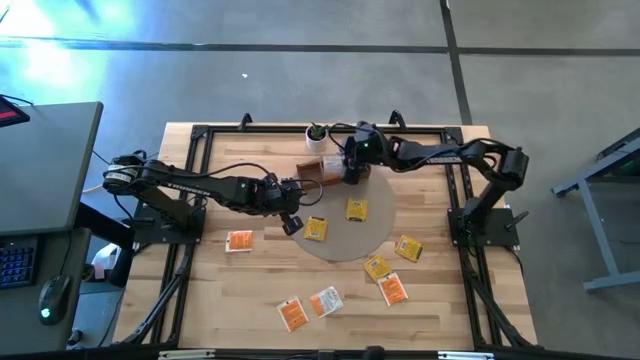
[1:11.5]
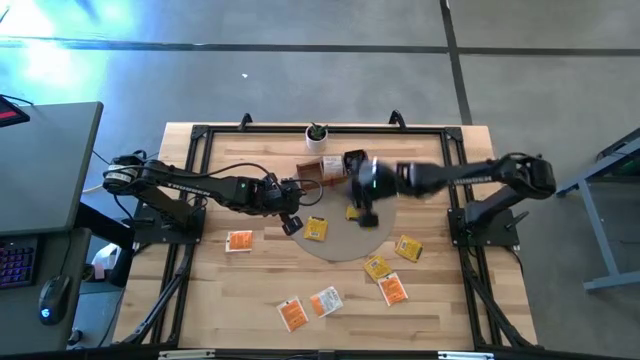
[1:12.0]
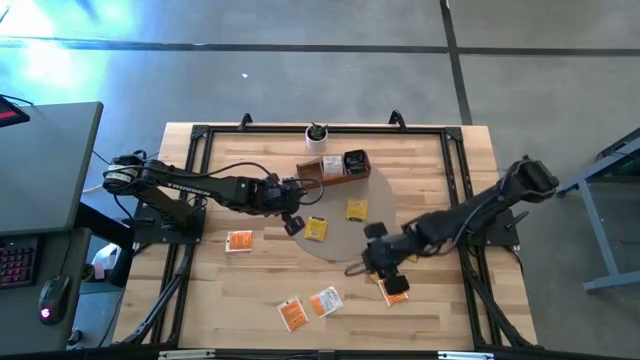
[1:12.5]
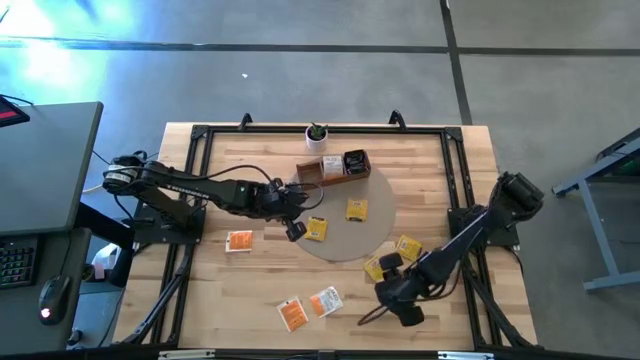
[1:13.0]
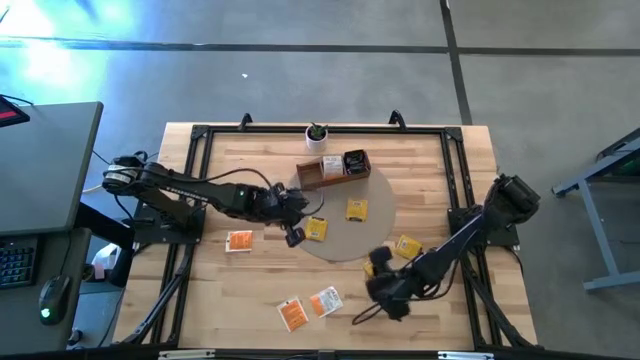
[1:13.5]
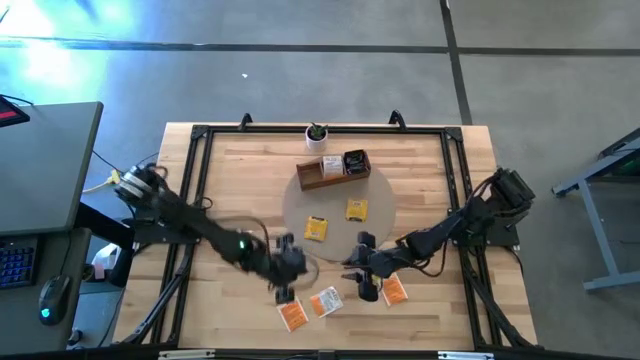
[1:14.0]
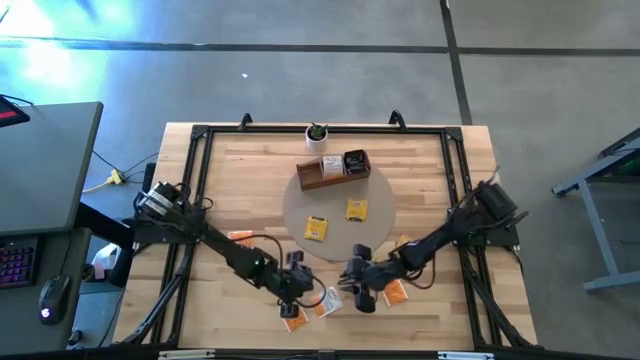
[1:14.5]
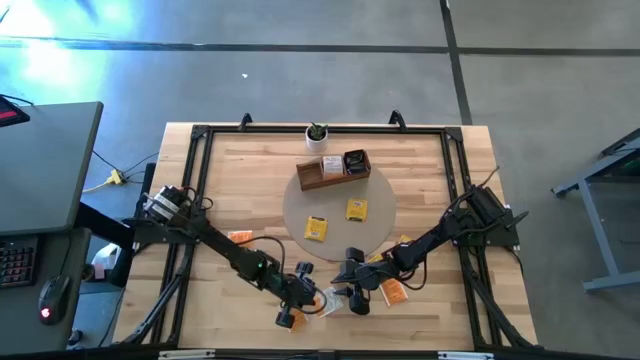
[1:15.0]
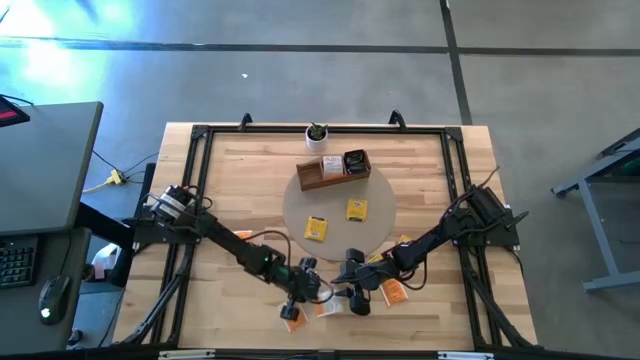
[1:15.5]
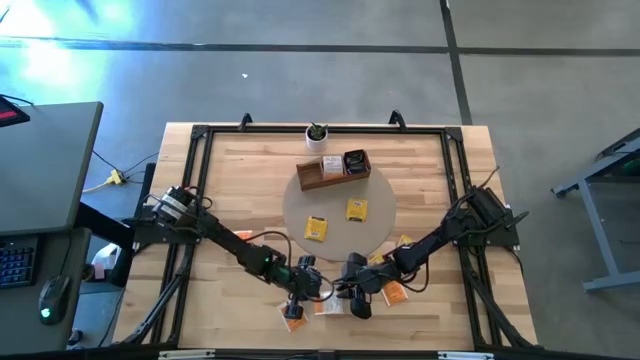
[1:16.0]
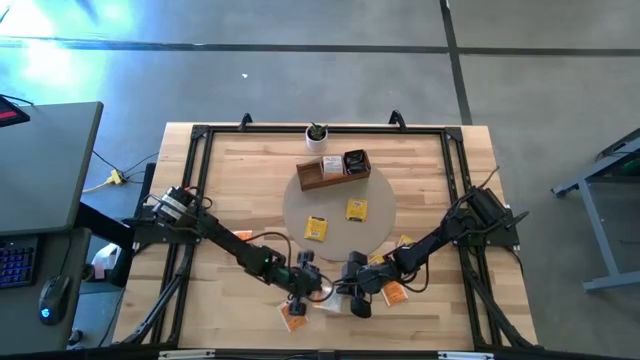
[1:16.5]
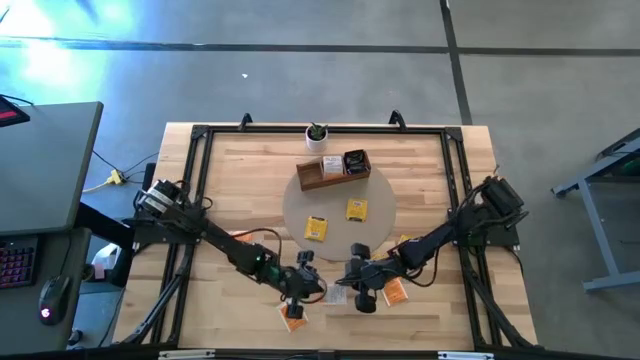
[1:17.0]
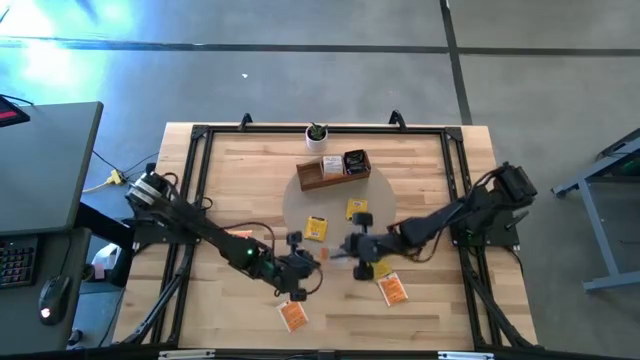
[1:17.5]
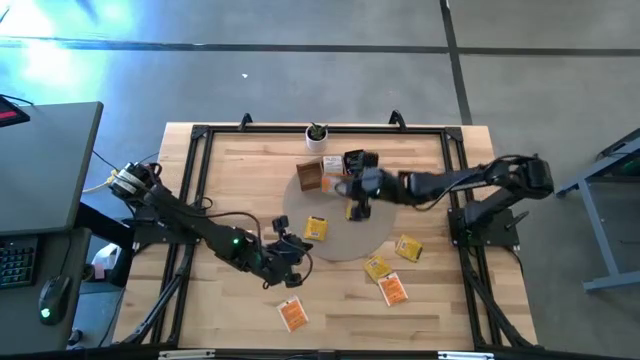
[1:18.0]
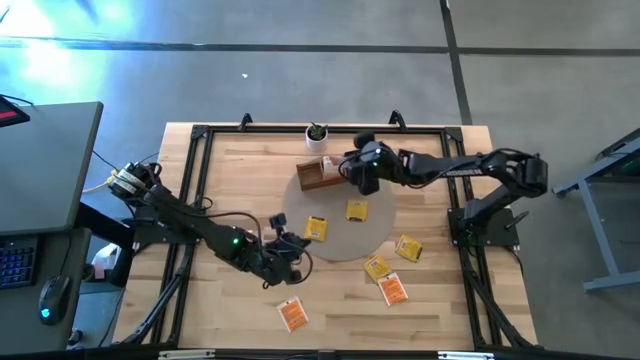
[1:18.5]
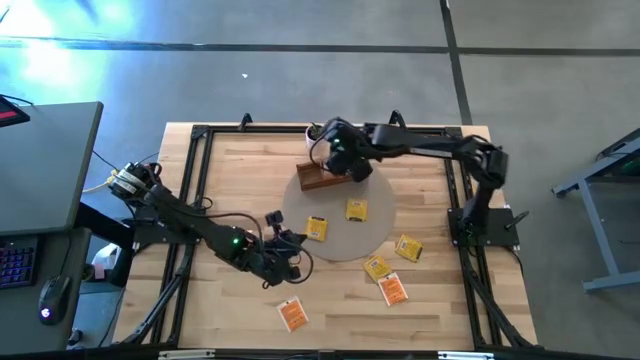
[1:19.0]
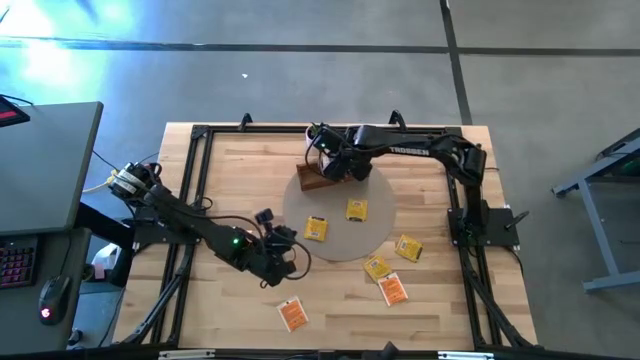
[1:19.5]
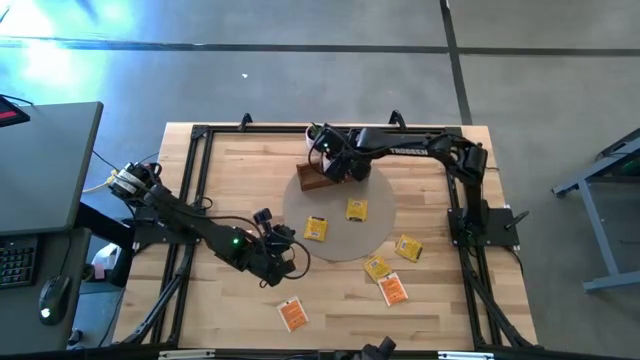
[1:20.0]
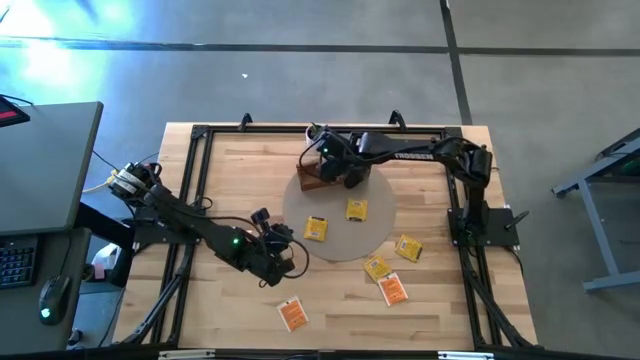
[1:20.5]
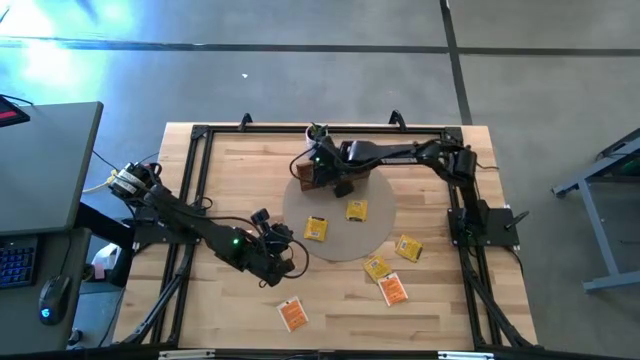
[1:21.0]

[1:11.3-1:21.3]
Task: Pick & Place Tea
Put the orange tea bag into the middle section of the wooden organizer

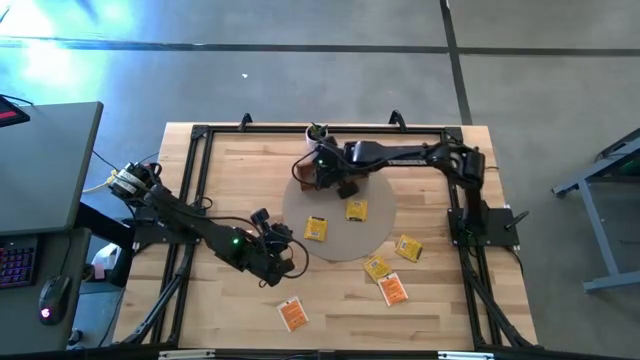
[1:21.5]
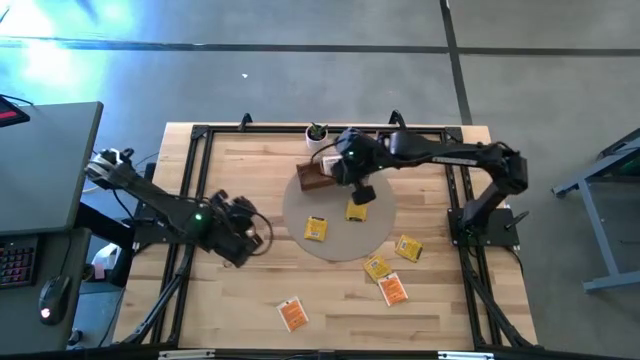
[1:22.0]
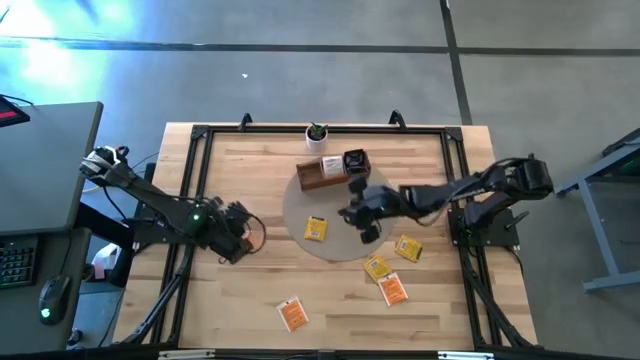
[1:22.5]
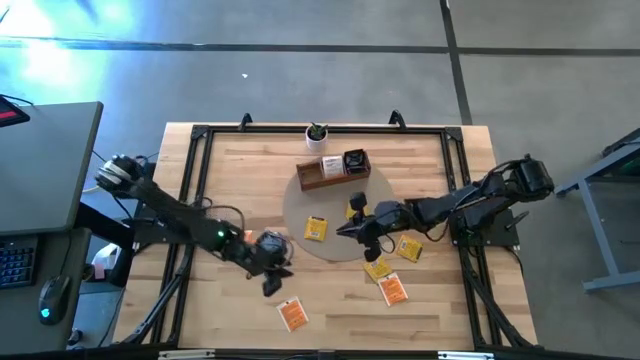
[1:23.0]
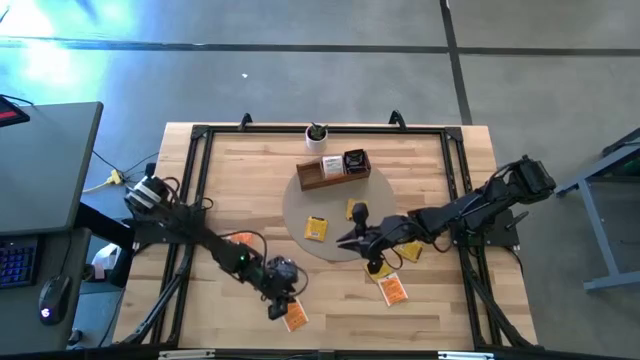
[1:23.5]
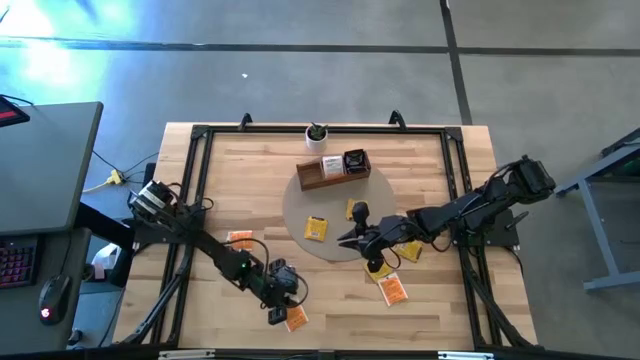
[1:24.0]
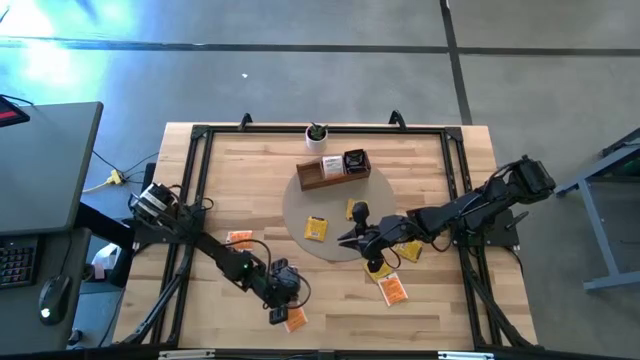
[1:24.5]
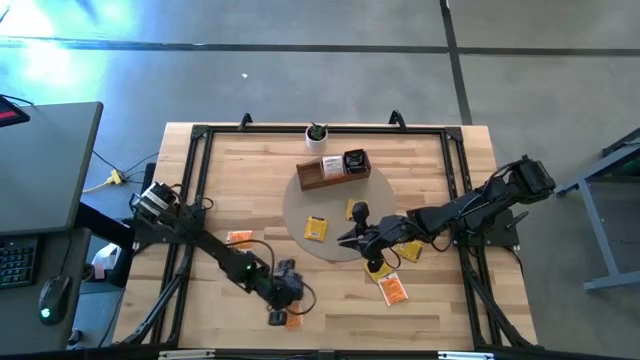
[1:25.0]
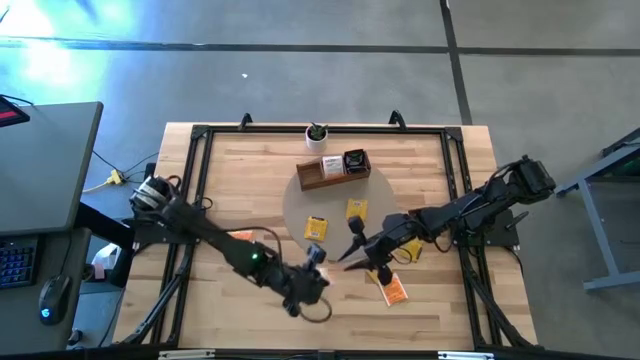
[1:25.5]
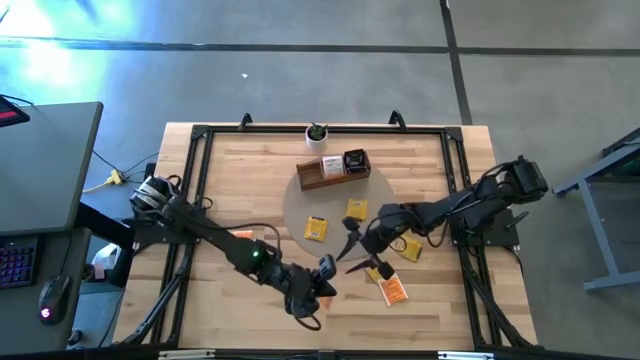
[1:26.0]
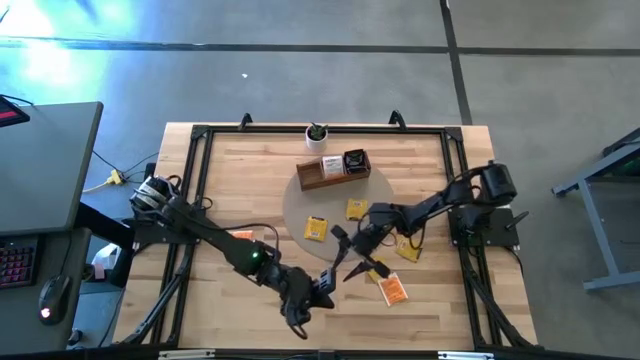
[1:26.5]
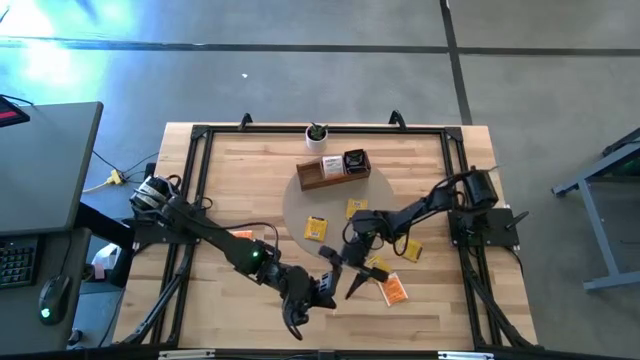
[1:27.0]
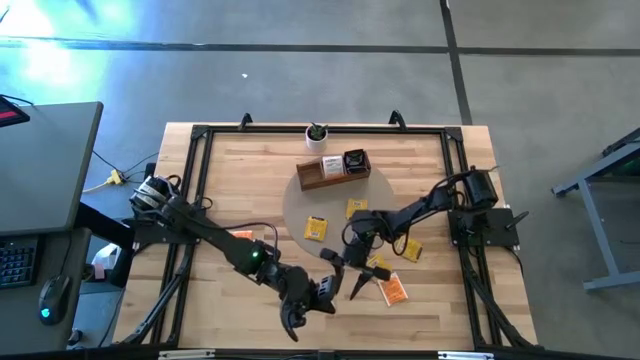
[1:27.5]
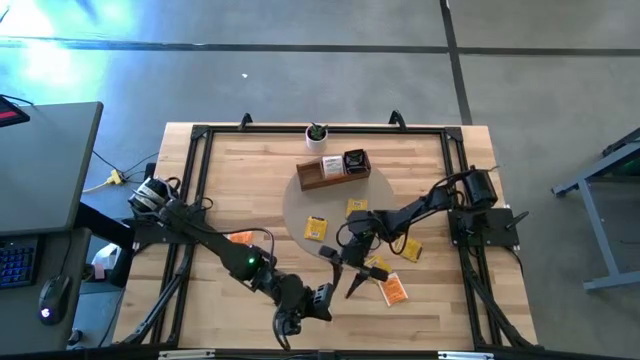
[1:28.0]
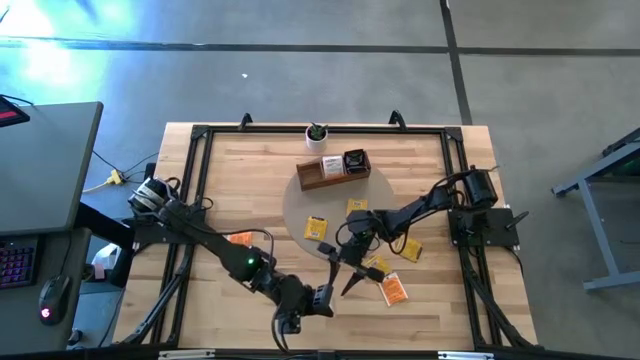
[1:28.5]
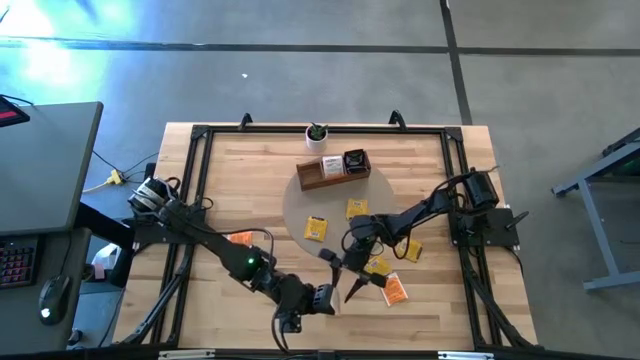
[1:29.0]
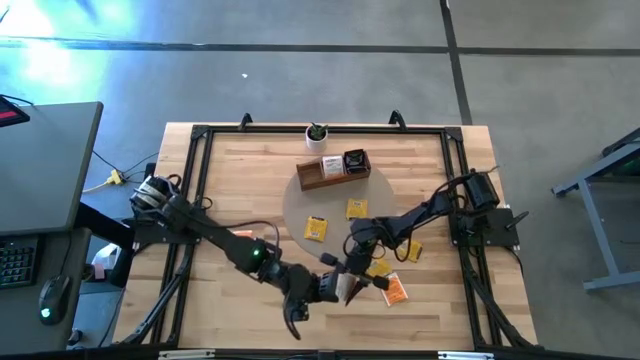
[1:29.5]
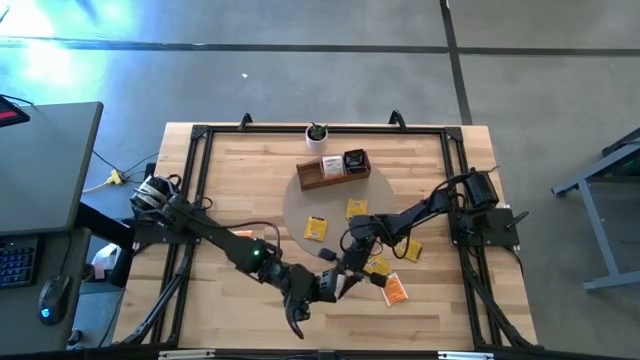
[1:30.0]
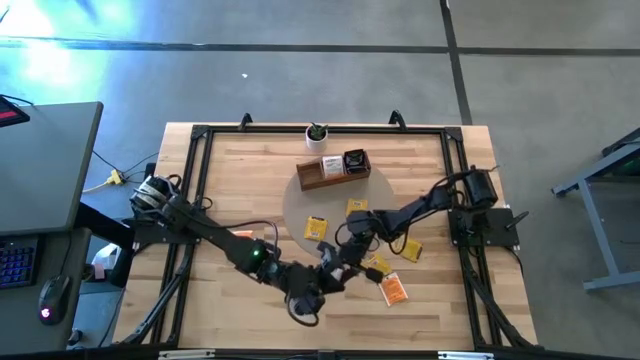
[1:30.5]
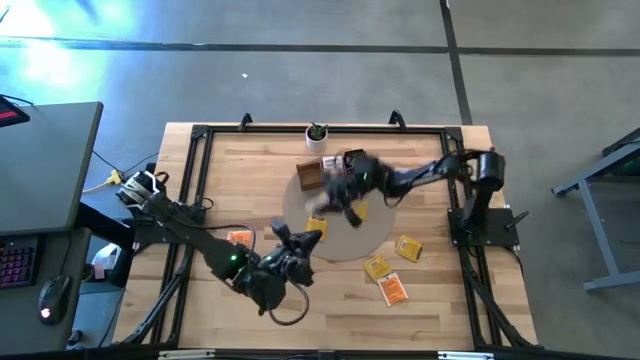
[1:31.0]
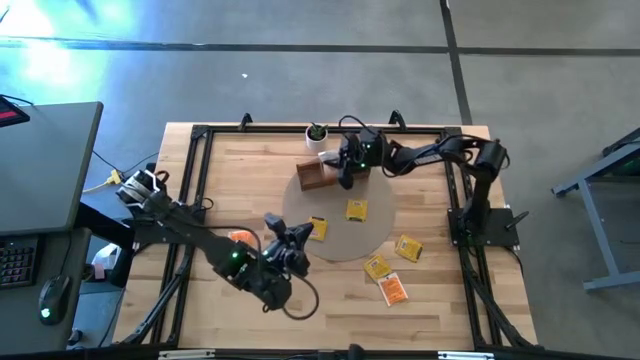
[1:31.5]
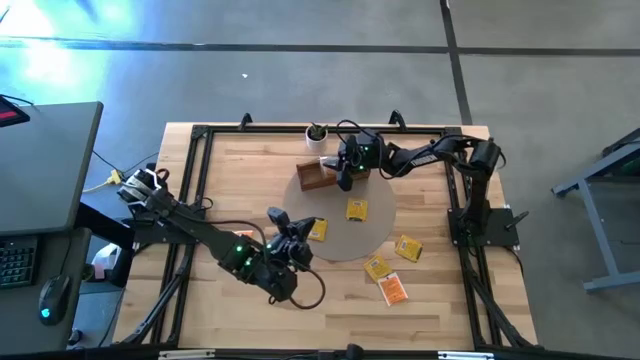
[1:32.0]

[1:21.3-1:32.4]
Put the bottom orange tea bag into the middle section of the wooden organizer

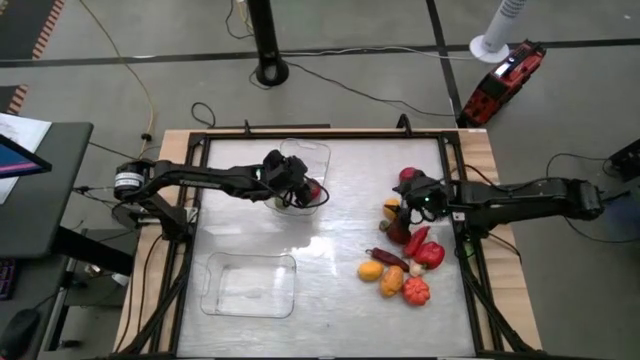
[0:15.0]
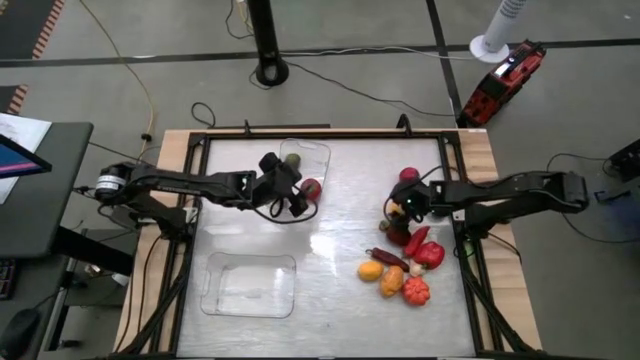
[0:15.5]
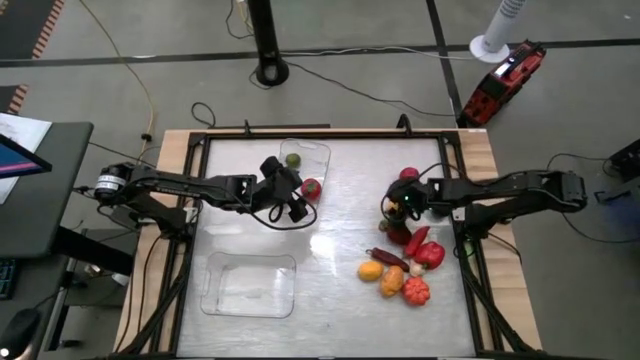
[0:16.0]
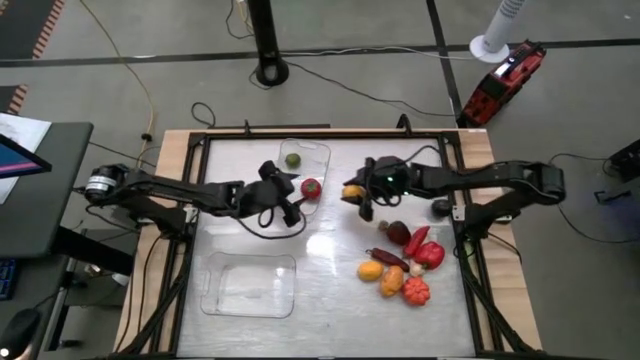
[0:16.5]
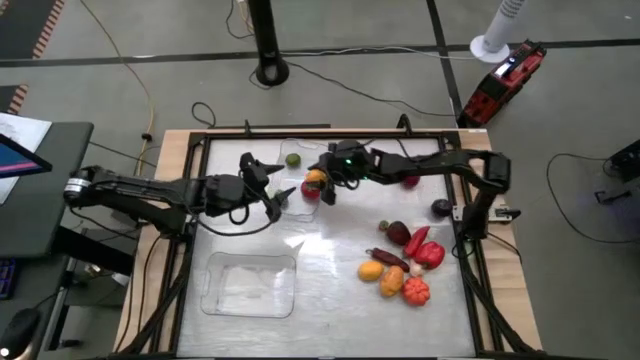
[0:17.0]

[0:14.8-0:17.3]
Task: Sort produce into baskets
Put the top lemon into the top transparent bin
